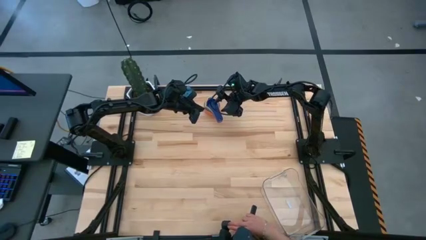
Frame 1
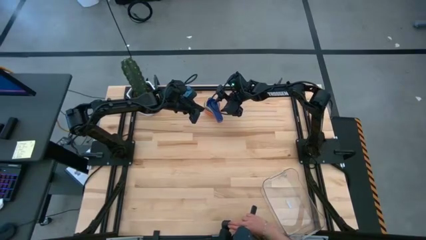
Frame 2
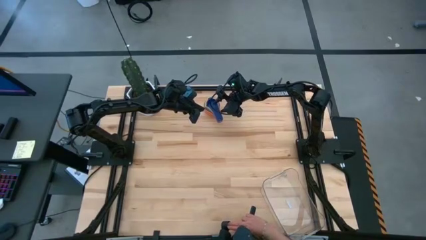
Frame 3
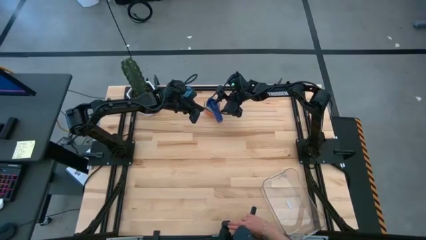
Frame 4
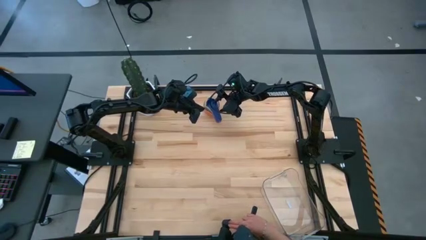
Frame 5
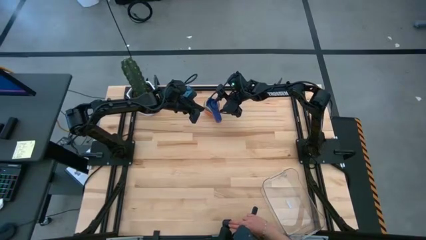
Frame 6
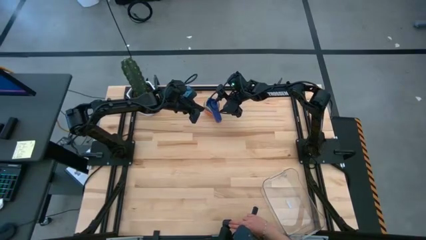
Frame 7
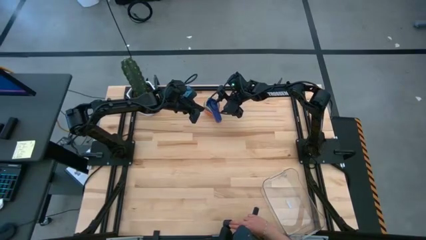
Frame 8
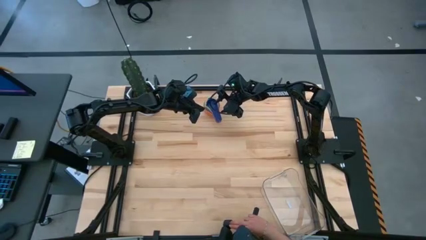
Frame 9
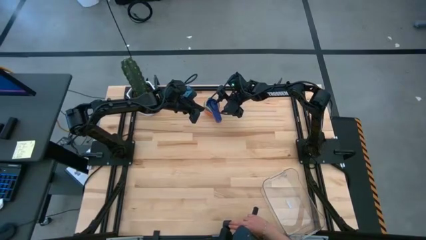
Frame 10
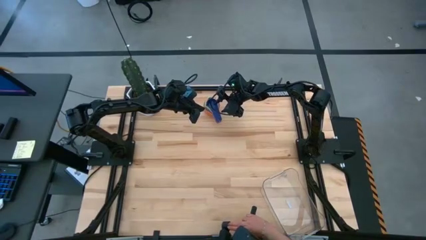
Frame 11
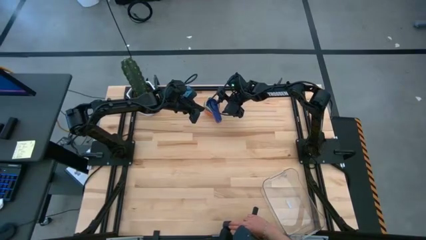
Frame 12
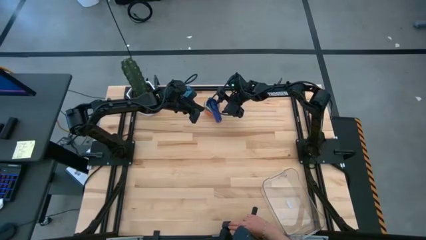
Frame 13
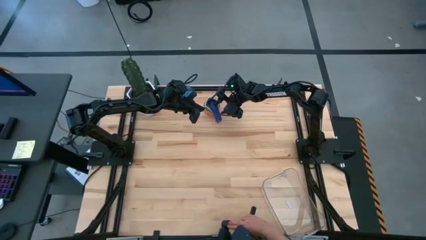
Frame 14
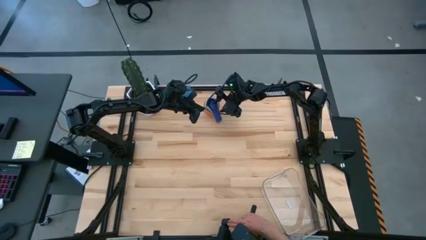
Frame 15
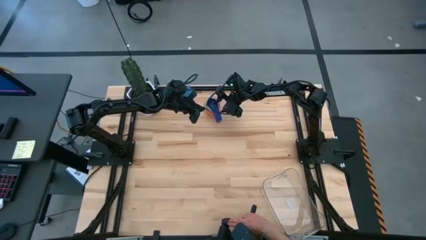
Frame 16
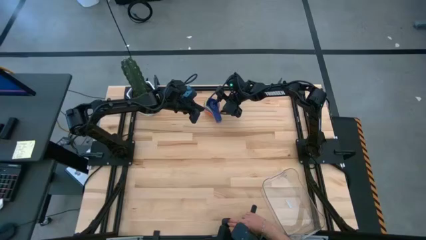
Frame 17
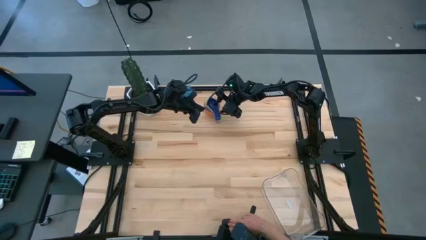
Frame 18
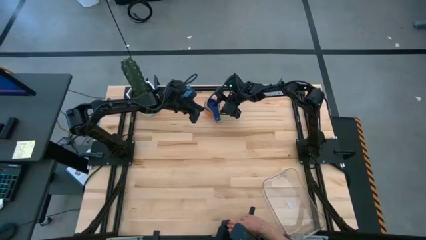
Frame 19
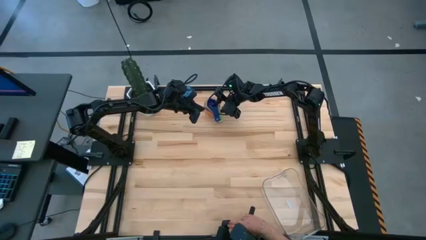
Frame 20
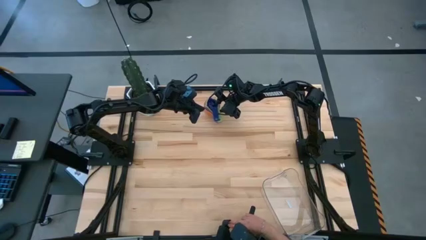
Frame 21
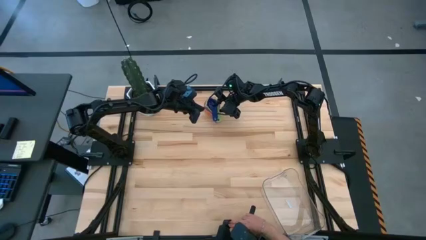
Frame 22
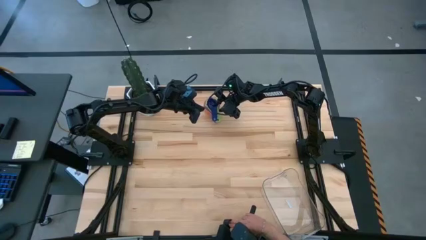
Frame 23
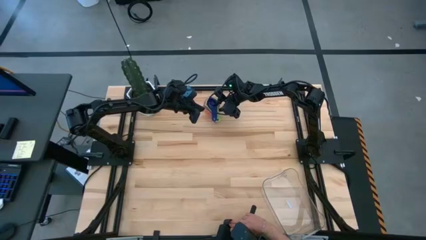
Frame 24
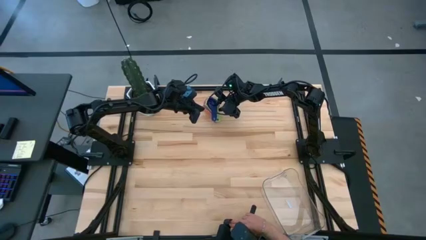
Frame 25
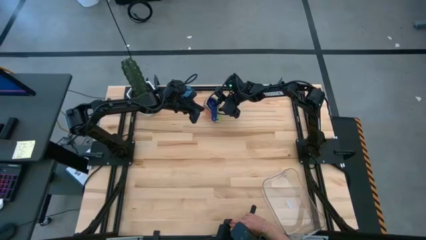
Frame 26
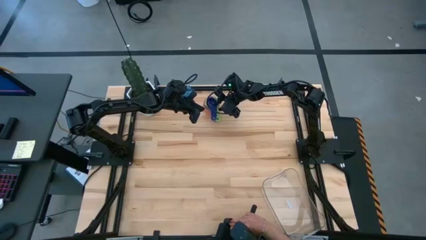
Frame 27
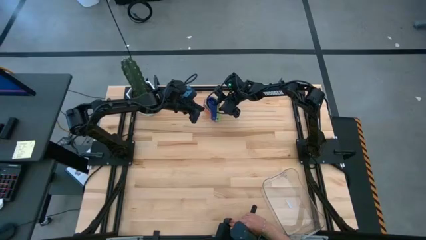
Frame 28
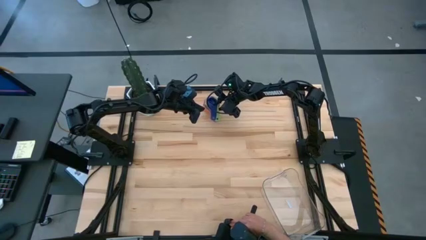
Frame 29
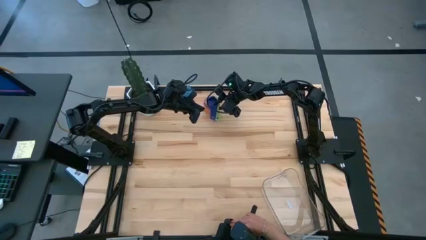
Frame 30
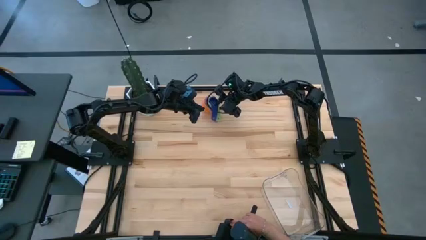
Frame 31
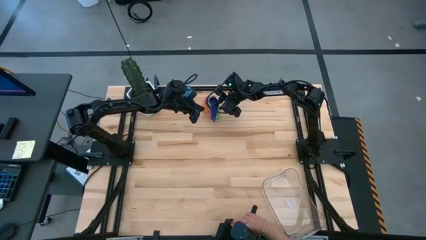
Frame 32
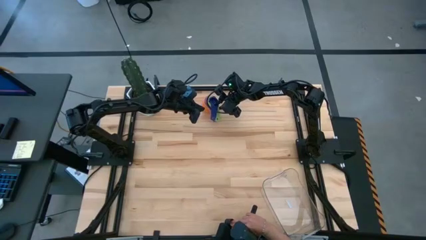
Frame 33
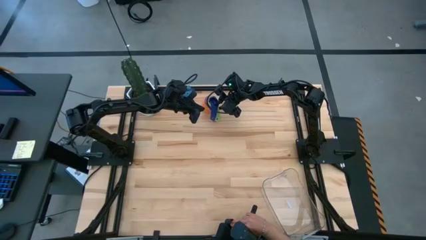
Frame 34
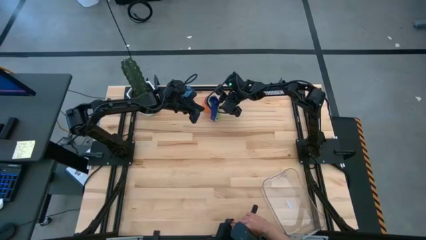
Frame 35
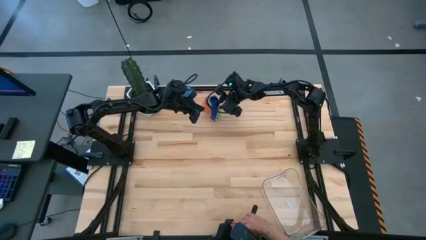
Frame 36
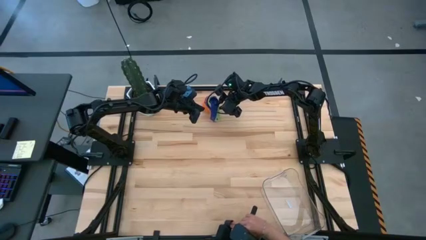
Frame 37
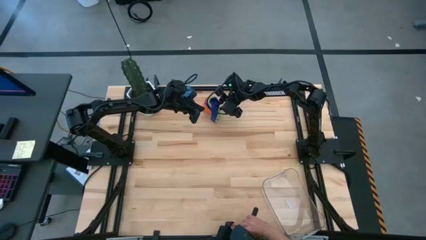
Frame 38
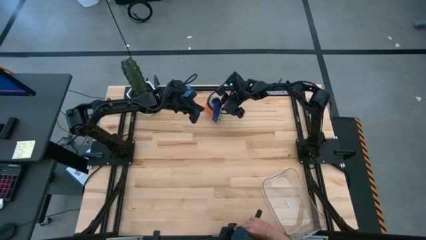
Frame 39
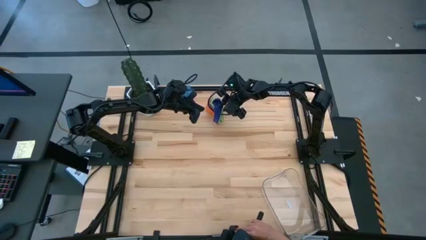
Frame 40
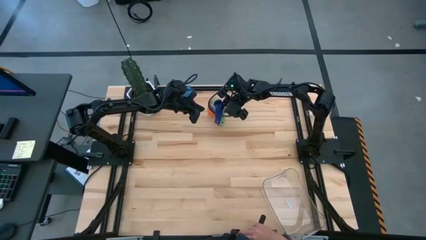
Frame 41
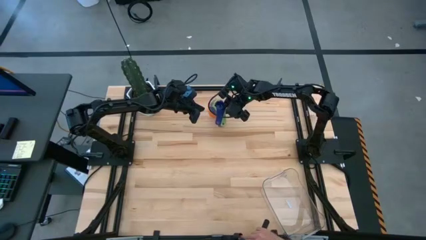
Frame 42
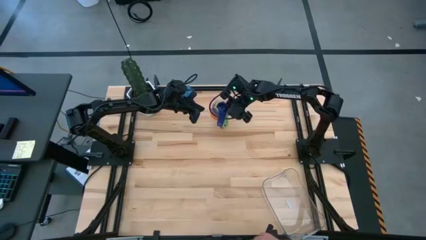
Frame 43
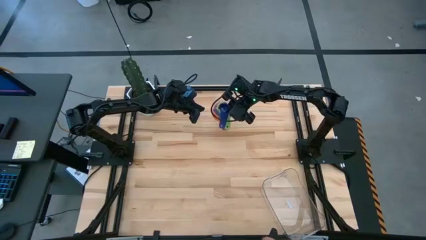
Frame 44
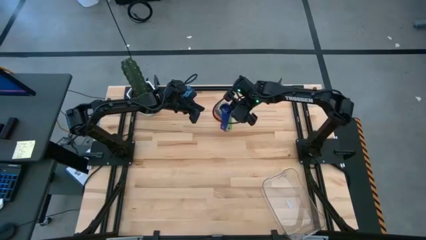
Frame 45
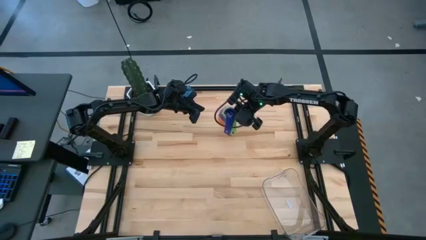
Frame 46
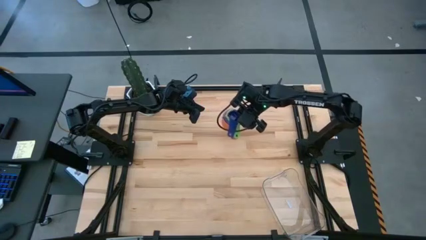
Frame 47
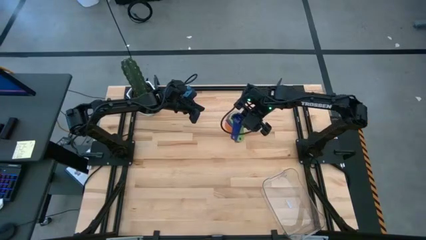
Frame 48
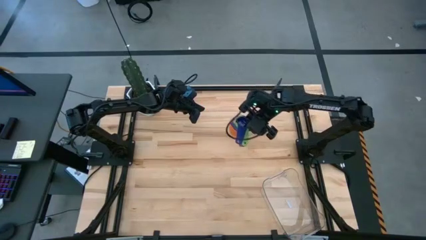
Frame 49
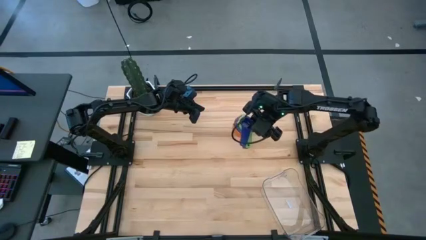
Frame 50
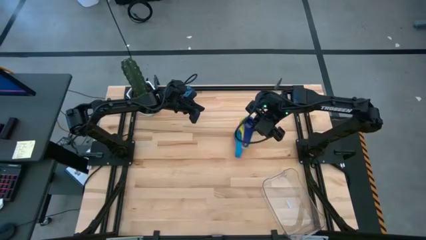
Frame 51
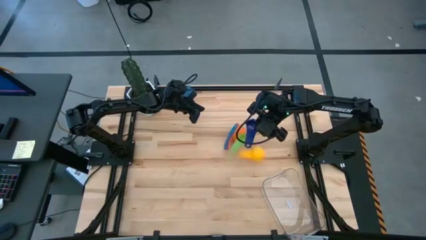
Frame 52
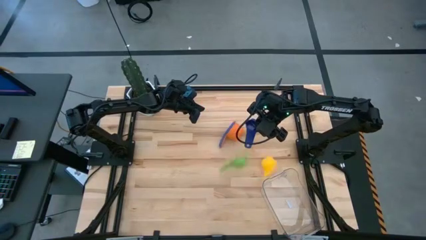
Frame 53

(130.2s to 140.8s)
Task: Nest measuring cups in basket
Put the stacked measuring cups into the transparent bin
